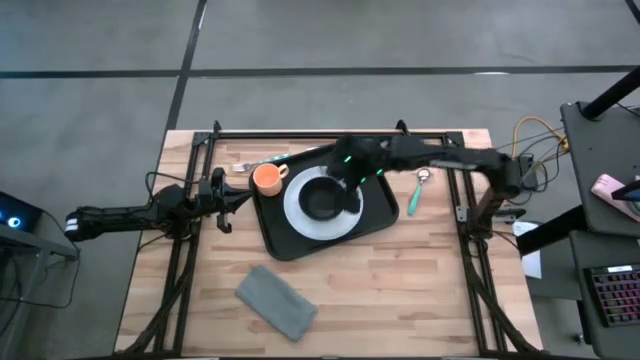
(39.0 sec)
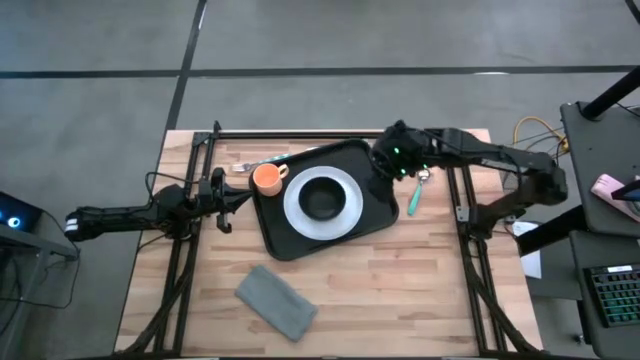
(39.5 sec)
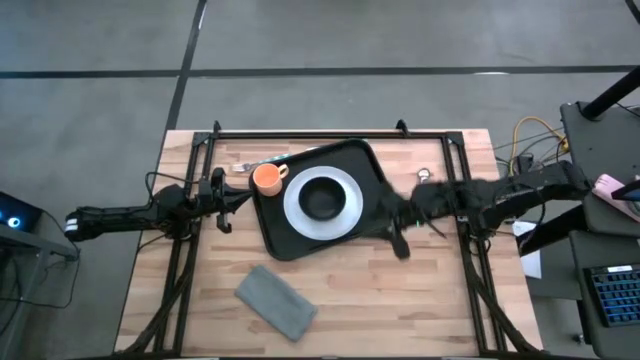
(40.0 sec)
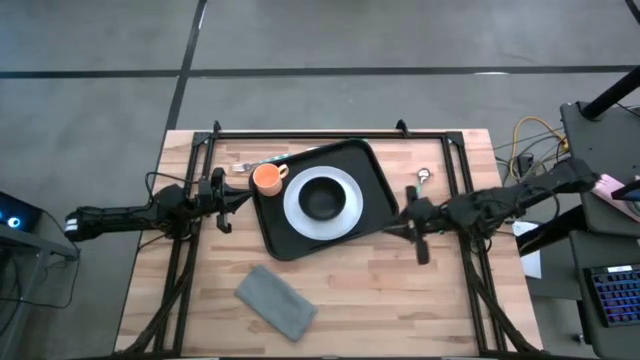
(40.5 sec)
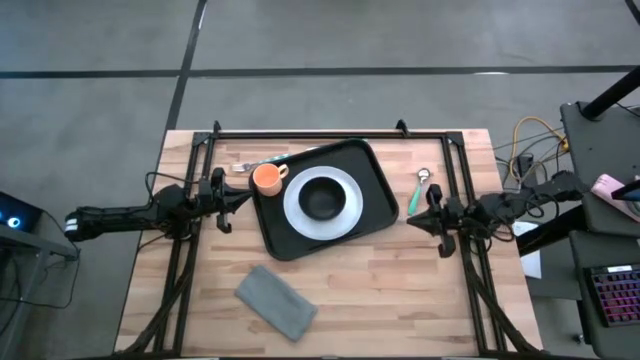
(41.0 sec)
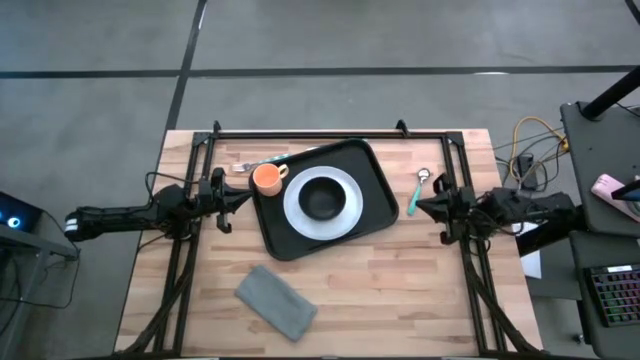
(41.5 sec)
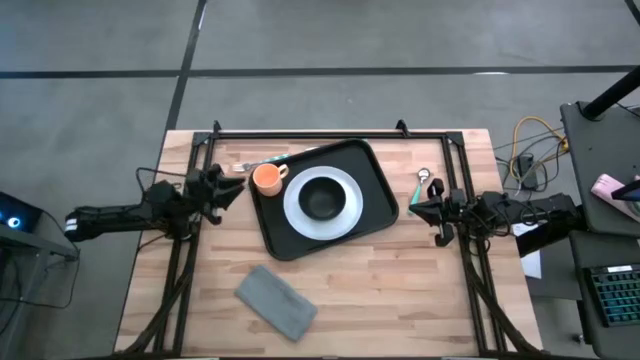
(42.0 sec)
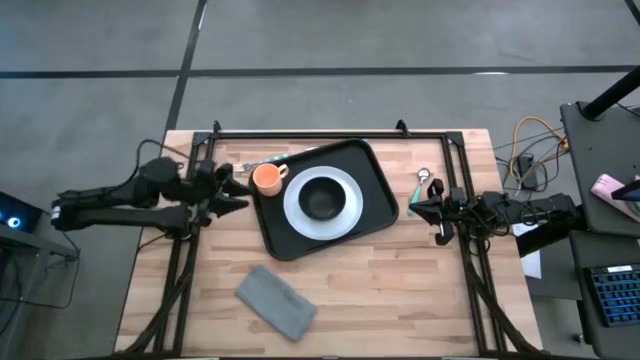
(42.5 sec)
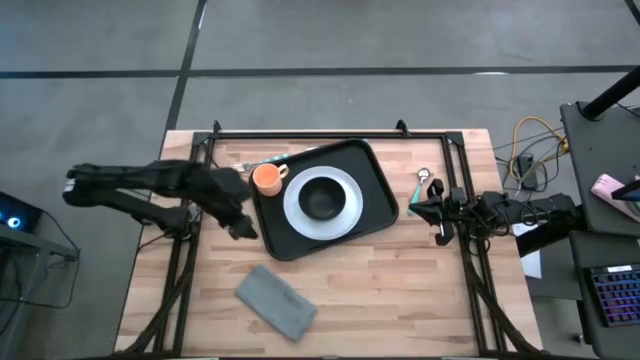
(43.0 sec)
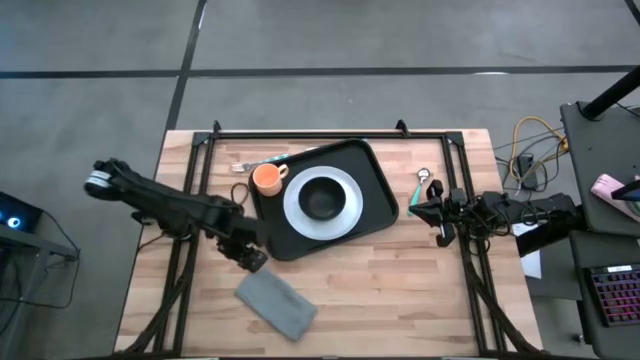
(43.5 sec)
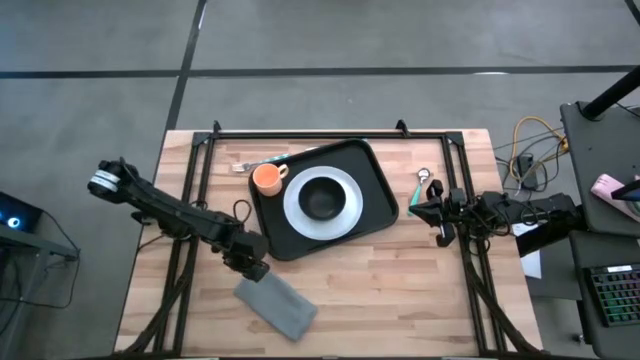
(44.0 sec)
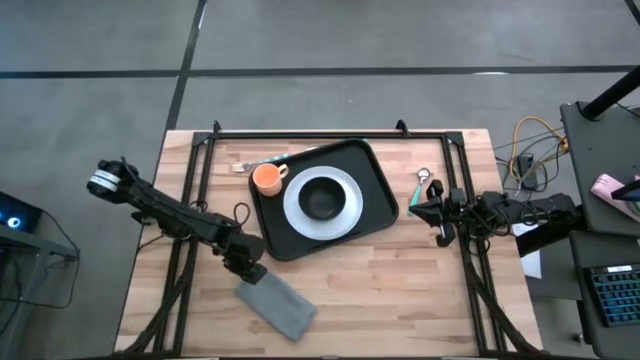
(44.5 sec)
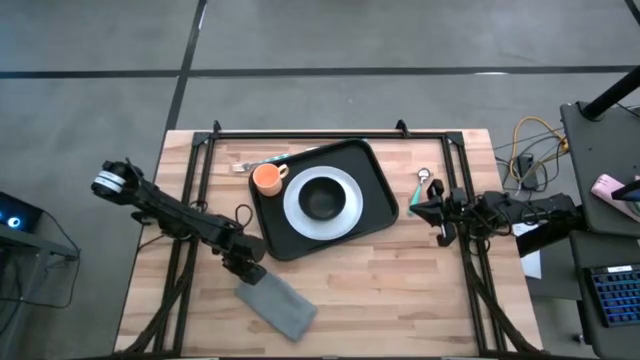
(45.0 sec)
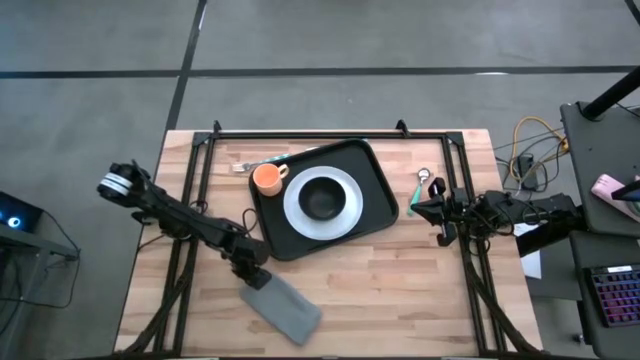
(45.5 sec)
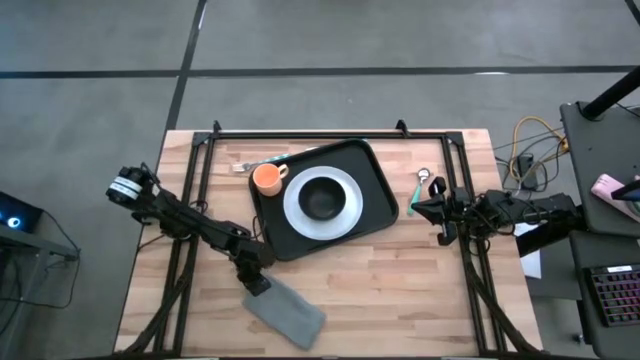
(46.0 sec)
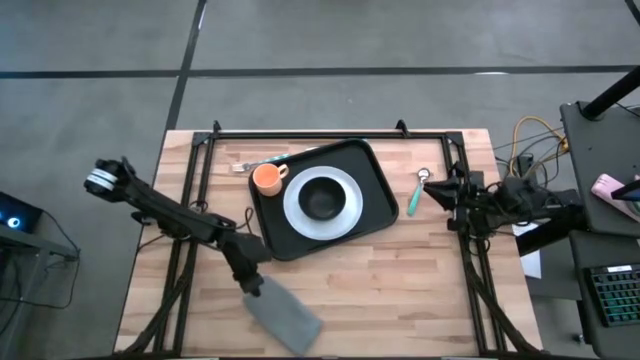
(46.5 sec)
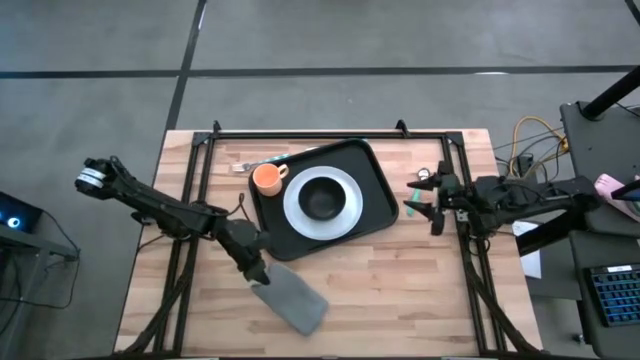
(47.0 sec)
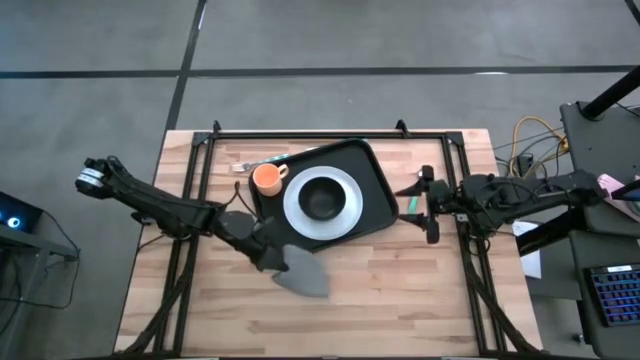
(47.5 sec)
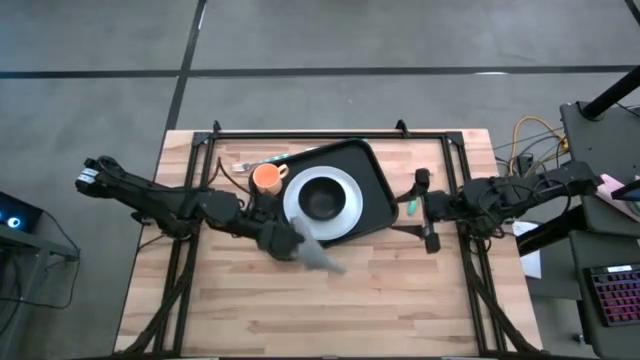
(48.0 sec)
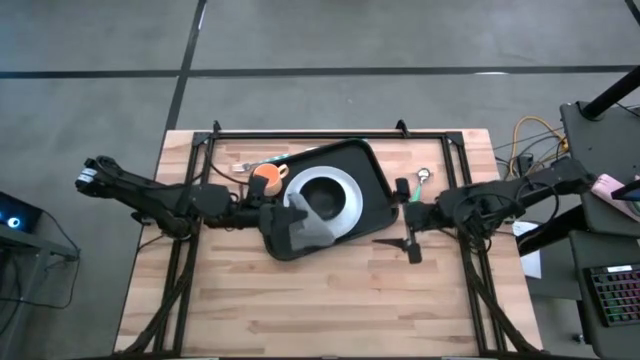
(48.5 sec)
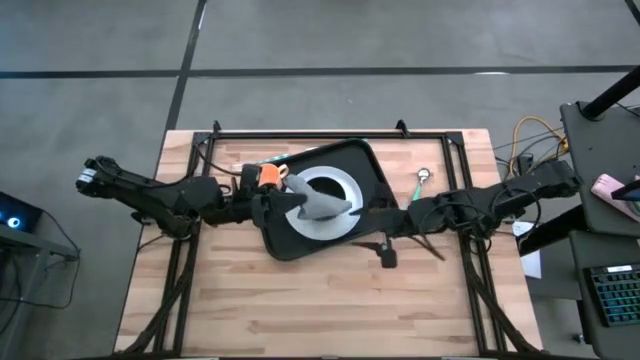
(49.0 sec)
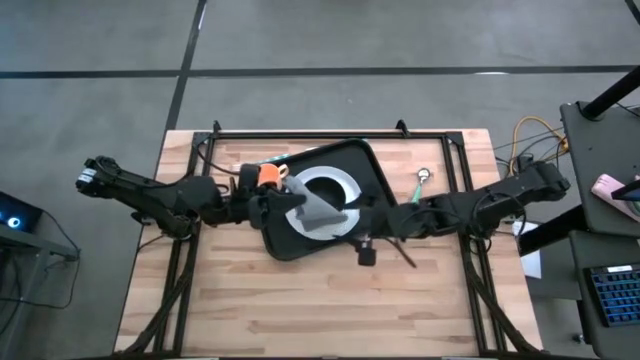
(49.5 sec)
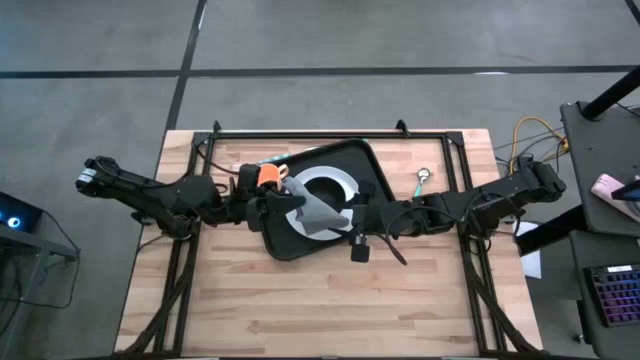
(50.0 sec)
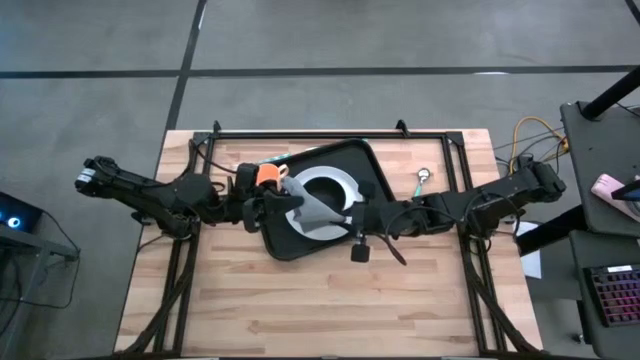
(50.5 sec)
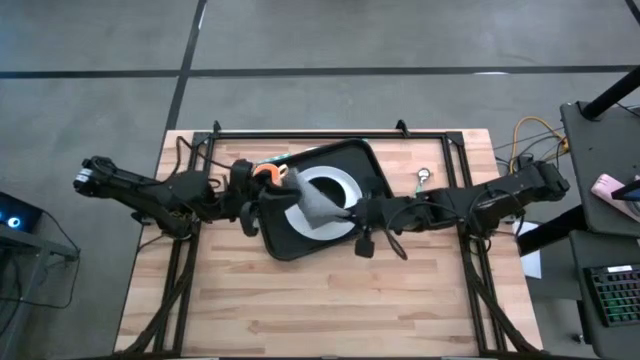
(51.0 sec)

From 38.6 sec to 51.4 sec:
Task: Set up tray
Put the gray napkin on the black tray to the right of the white plate

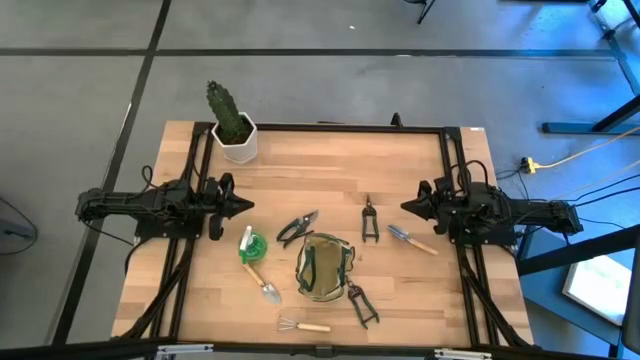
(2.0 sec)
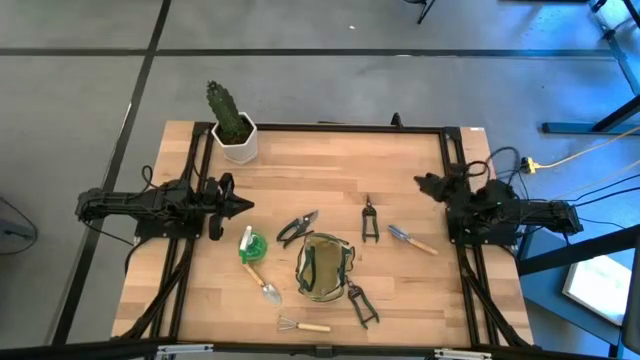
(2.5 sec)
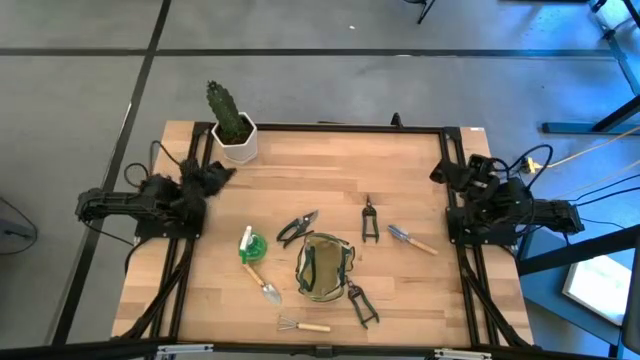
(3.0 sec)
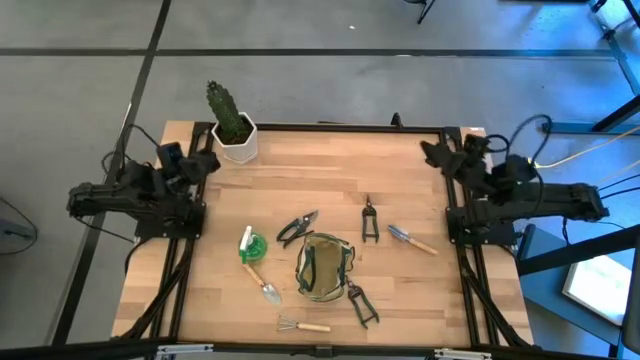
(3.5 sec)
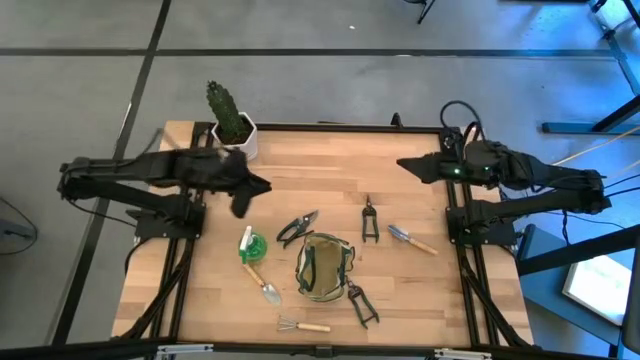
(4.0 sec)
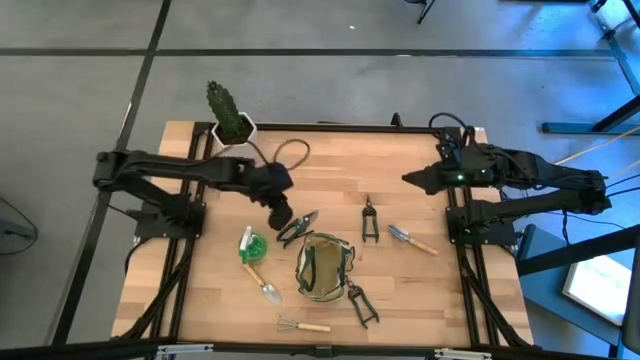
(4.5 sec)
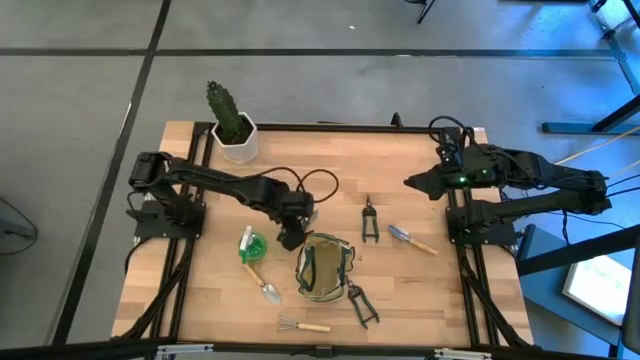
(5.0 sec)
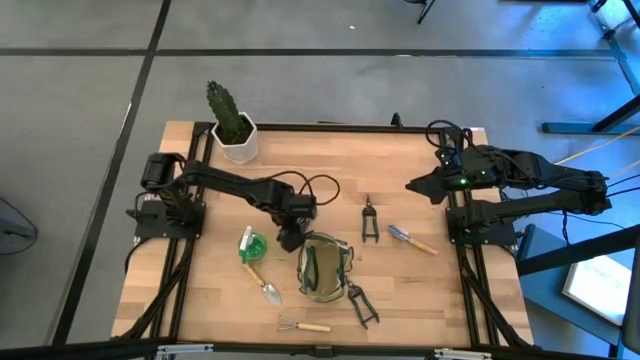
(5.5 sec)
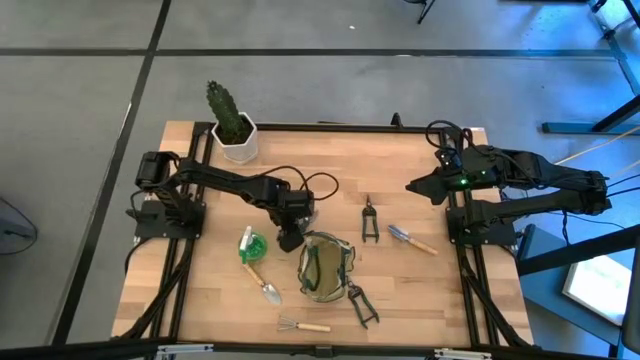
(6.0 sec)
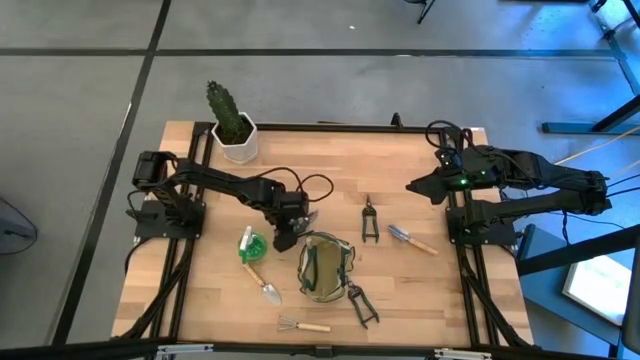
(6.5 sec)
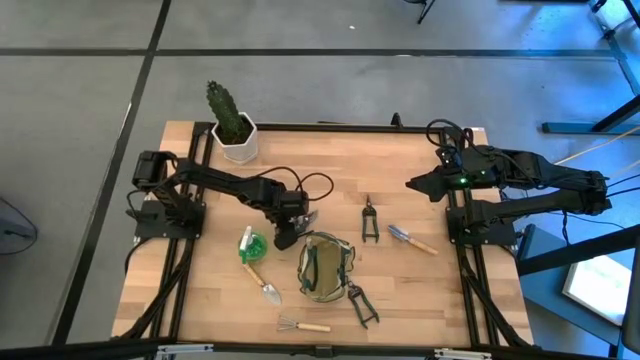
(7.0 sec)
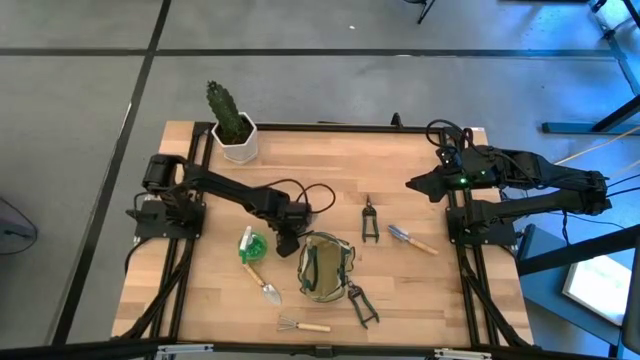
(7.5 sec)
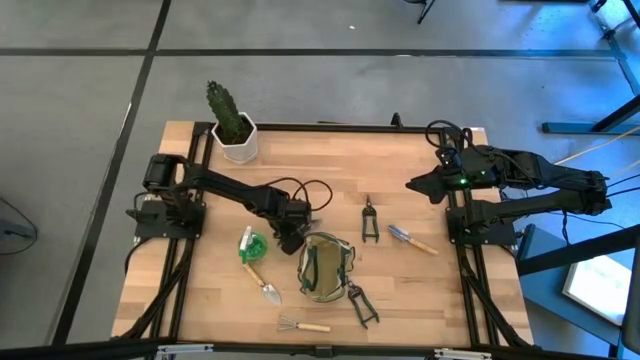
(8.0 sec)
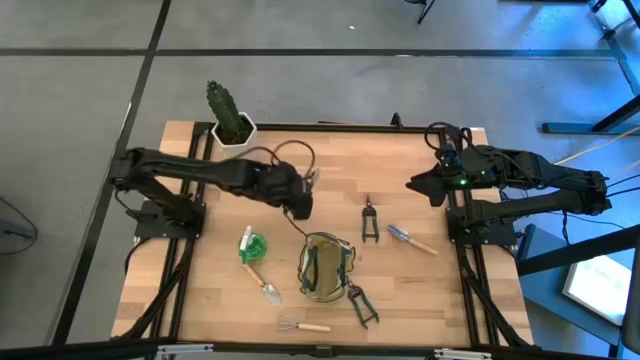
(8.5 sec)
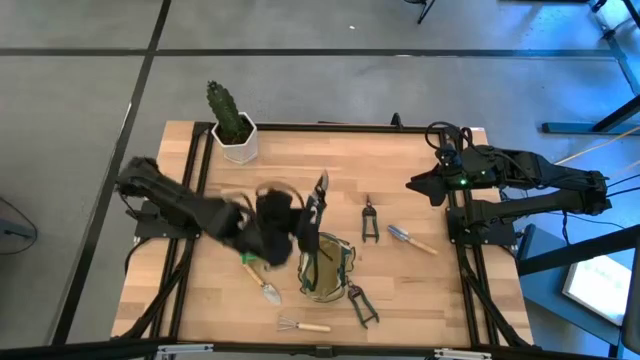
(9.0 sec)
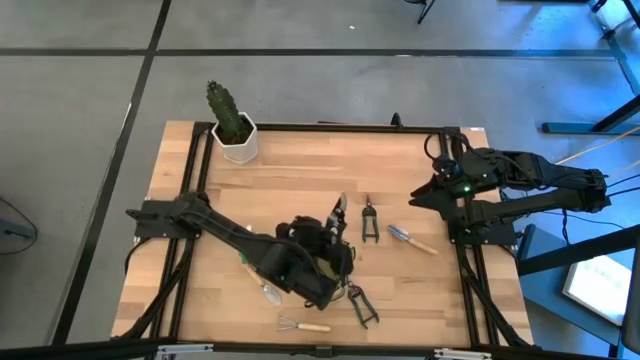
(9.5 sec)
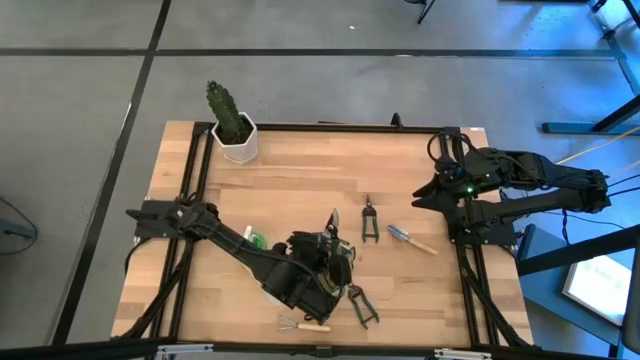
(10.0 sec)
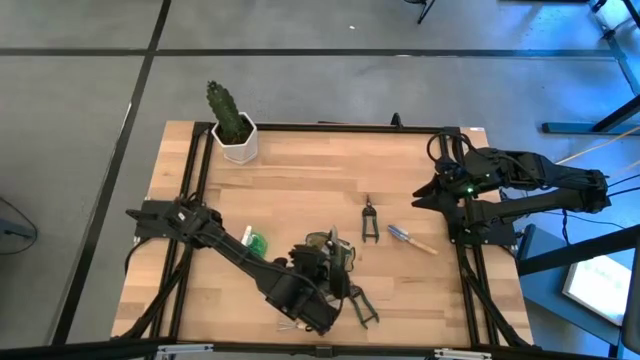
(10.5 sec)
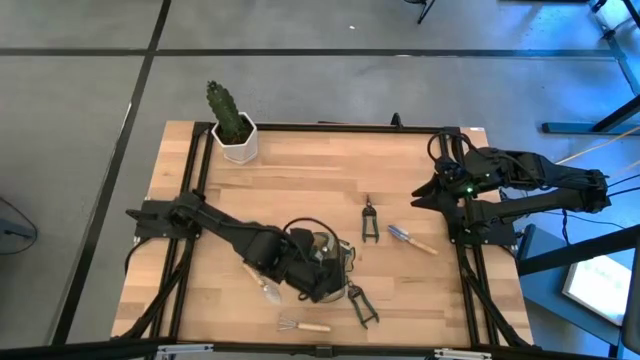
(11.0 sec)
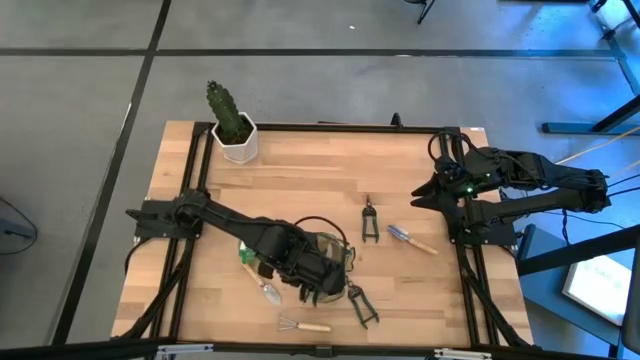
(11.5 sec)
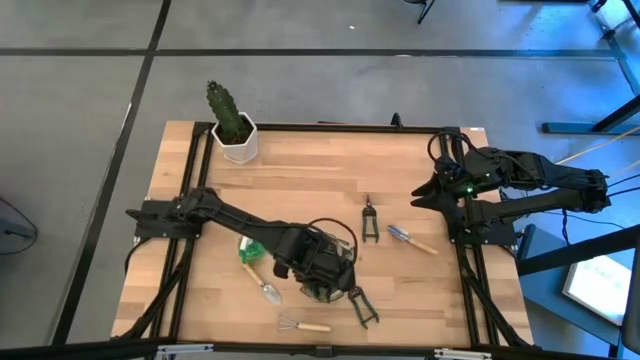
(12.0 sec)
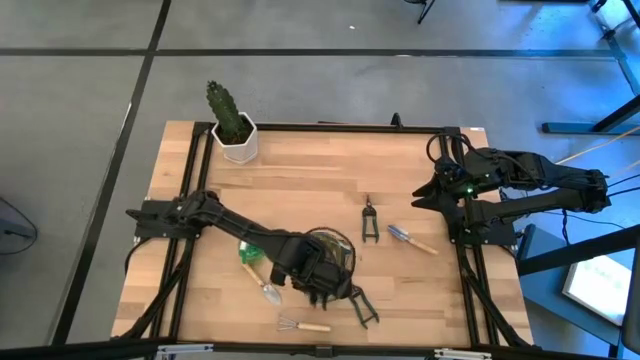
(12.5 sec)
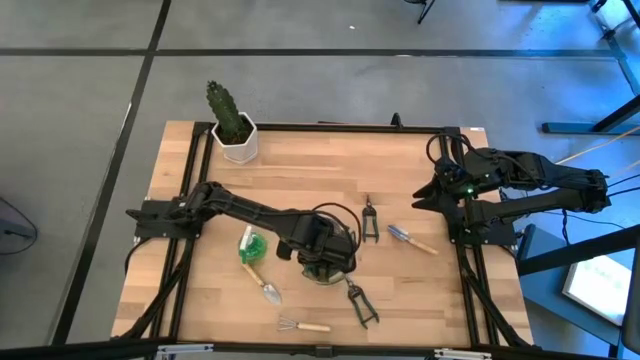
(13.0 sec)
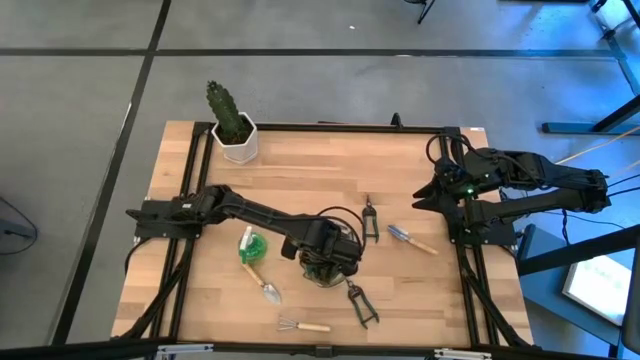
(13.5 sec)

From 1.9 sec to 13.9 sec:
Task: Pick & Place Garden tools in Gardening bag
Put the shear scissors into the gardening bag
